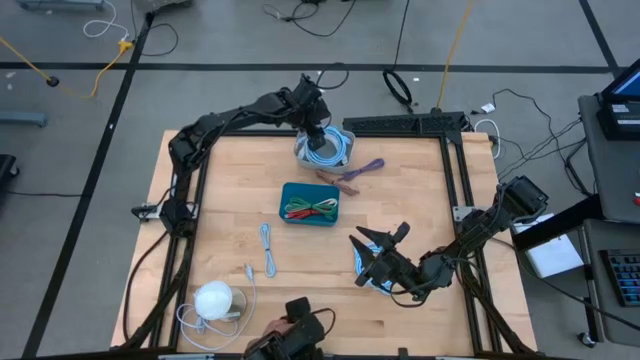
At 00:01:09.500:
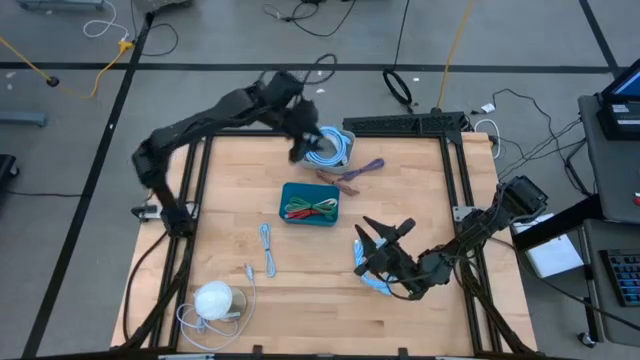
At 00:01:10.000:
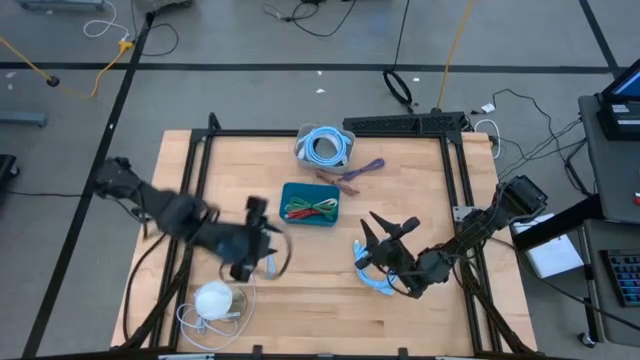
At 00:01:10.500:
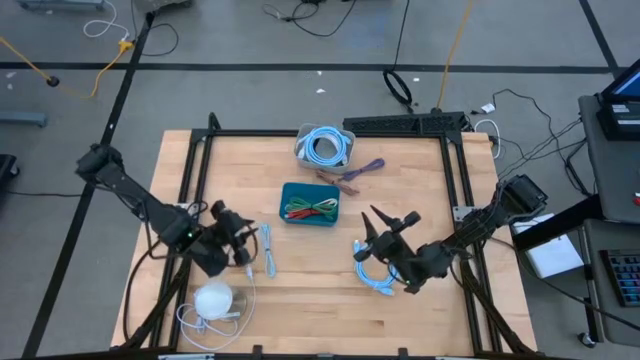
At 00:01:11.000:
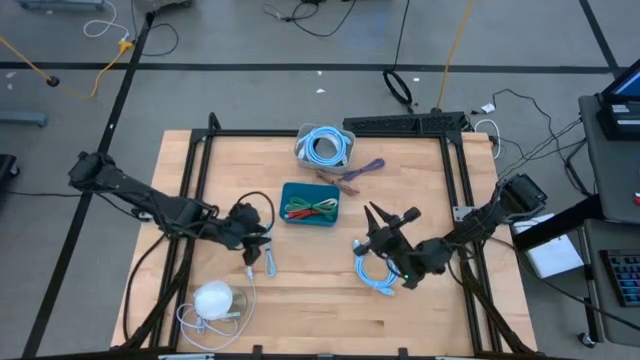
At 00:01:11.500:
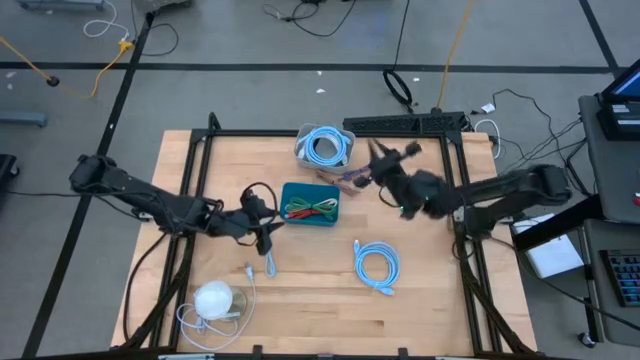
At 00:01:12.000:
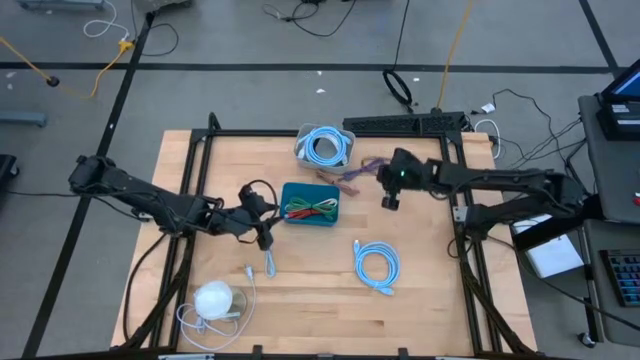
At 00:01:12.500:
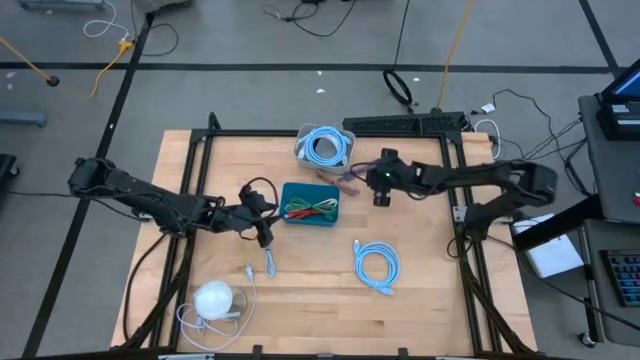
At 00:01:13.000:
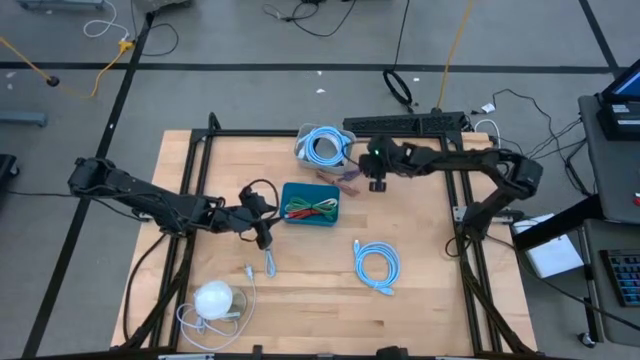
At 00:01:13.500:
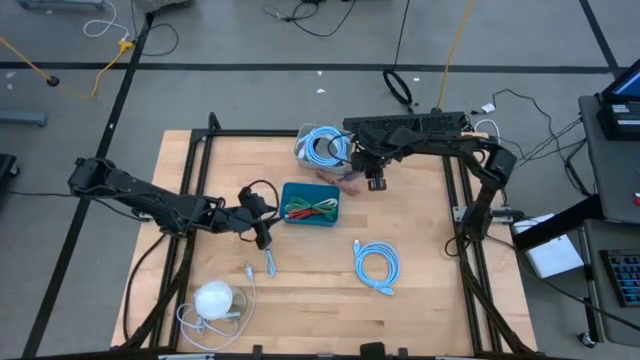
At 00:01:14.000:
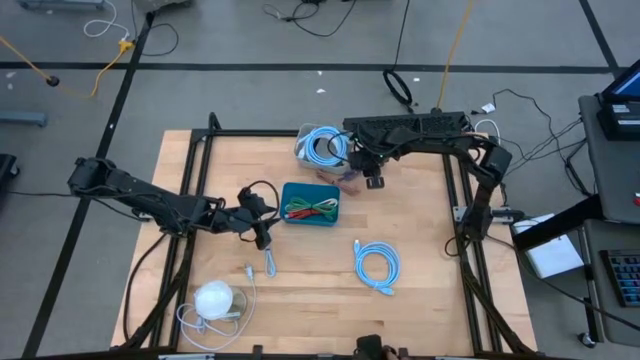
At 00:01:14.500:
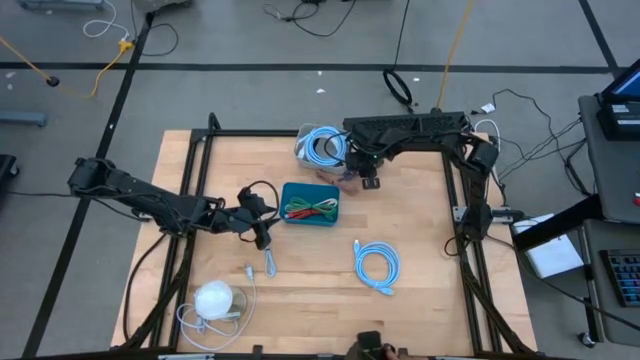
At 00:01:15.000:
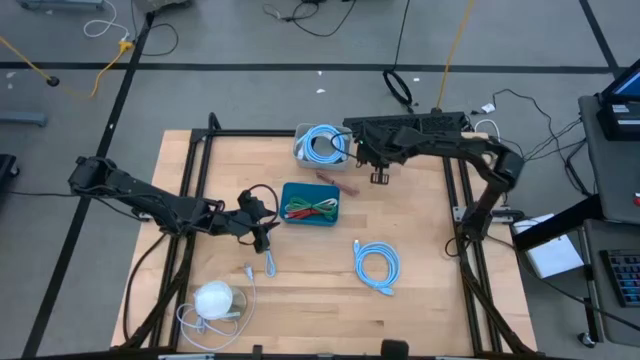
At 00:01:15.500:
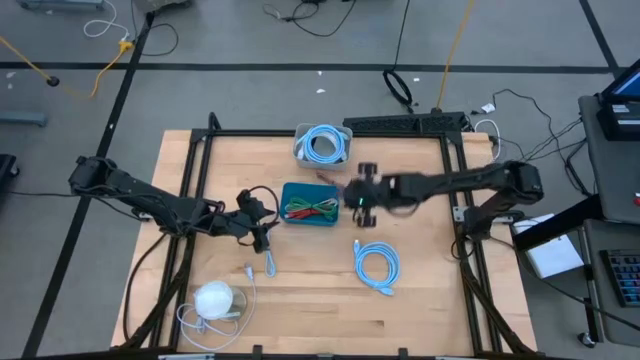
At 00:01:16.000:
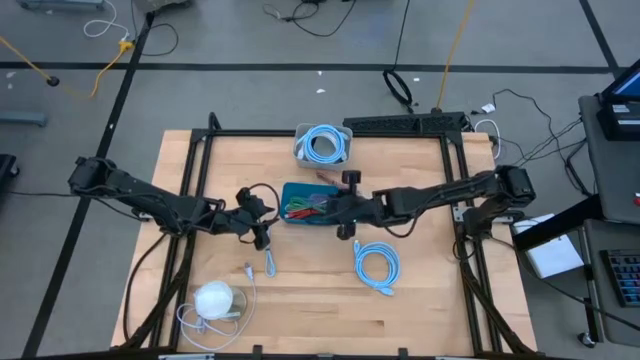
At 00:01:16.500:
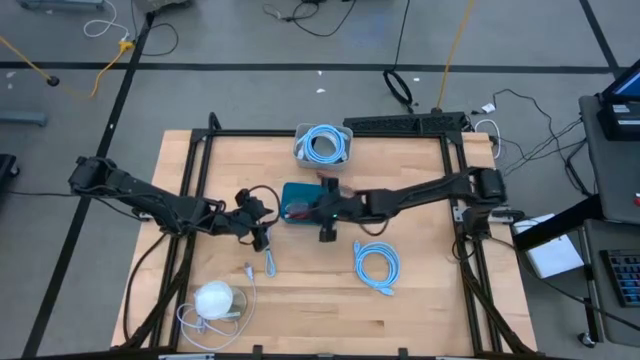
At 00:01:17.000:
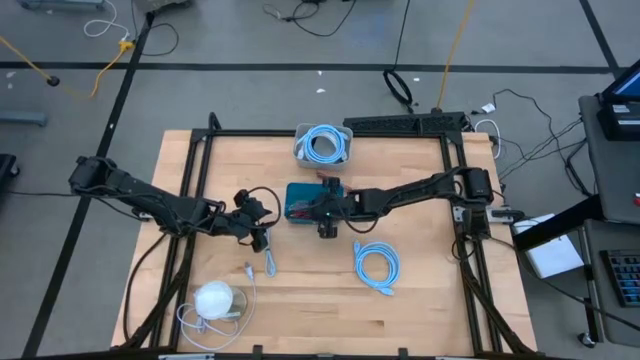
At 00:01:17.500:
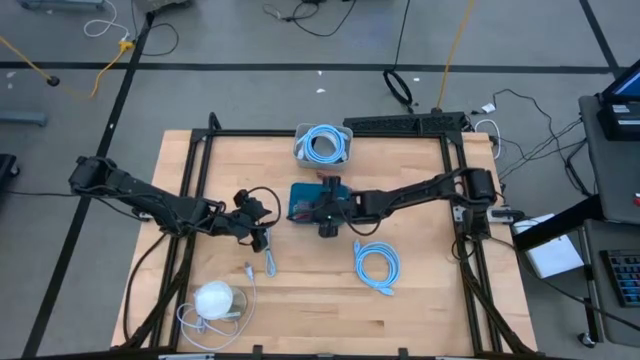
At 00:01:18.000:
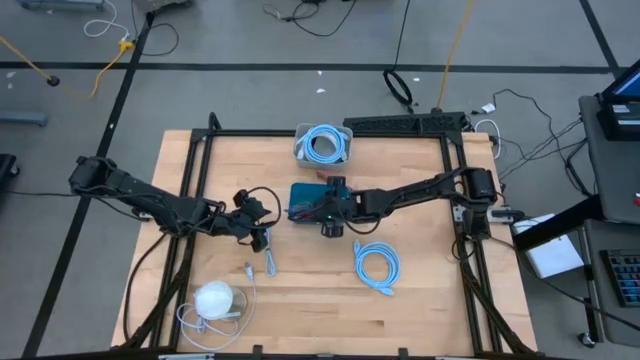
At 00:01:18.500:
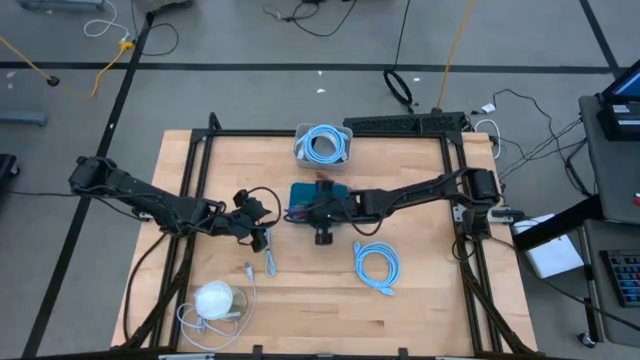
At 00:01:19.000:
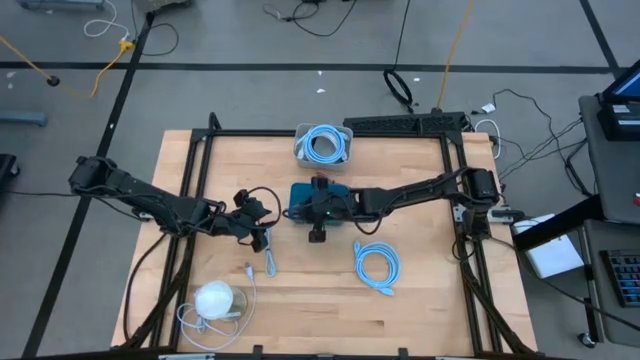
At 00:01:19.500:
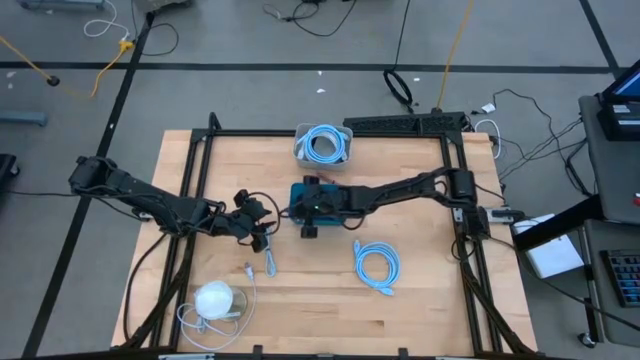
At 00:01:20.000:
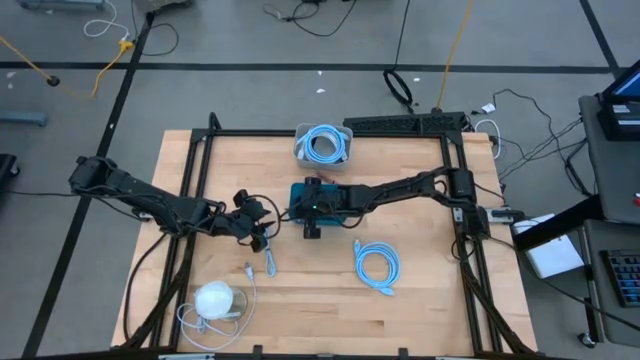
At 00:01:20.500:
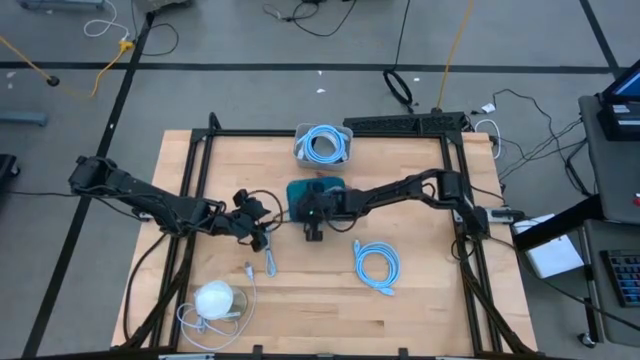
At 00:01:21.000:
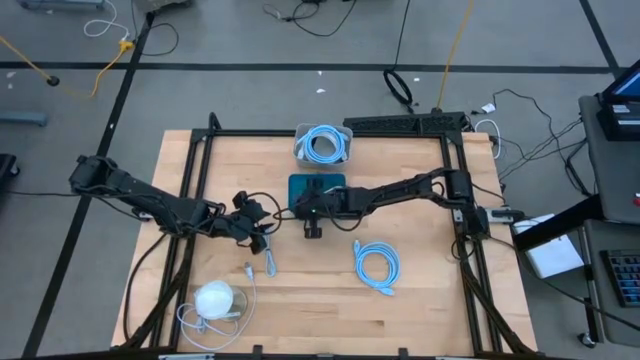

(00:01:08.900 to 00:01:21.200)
Task: Pick & Place USB Port
Put the purple charger cable into the blue bin

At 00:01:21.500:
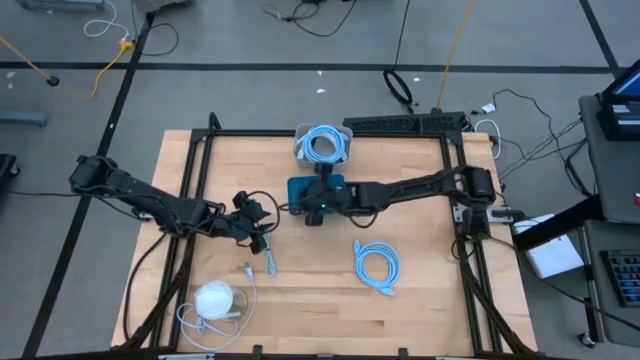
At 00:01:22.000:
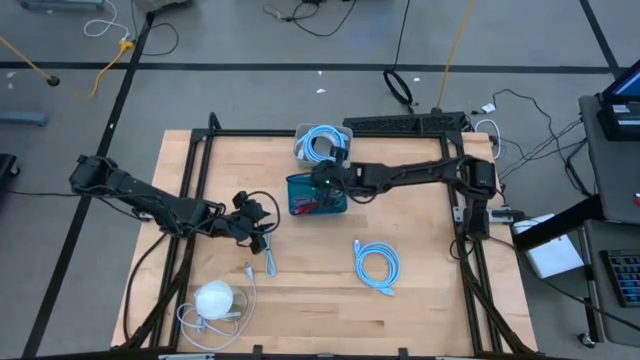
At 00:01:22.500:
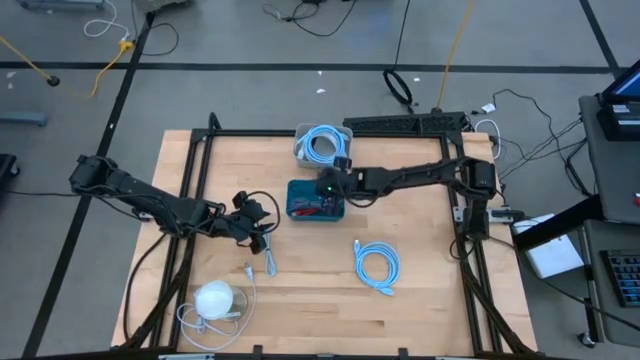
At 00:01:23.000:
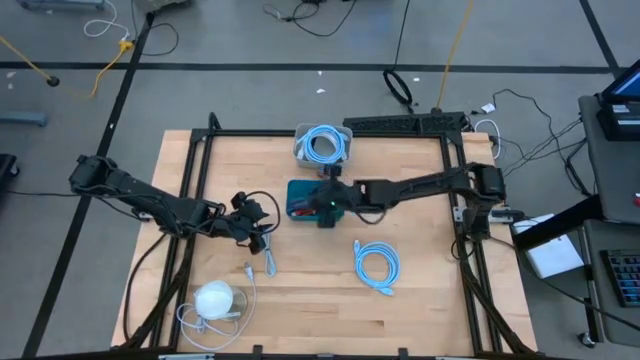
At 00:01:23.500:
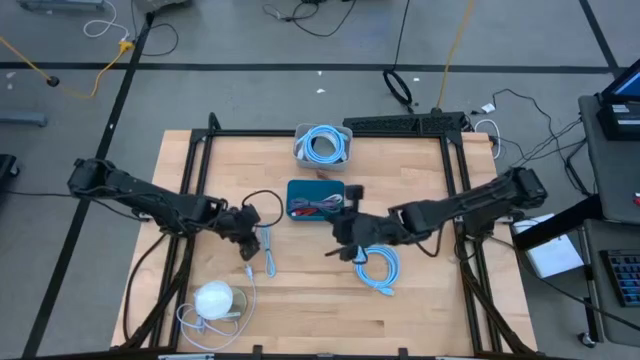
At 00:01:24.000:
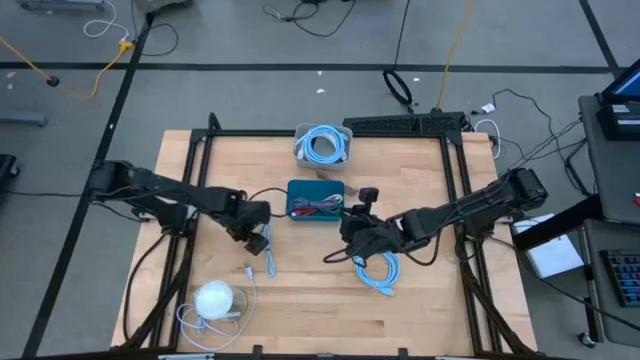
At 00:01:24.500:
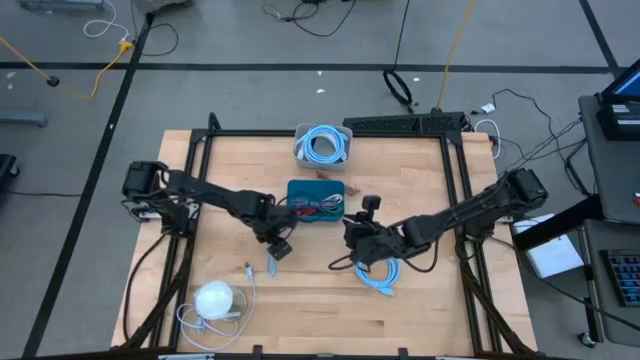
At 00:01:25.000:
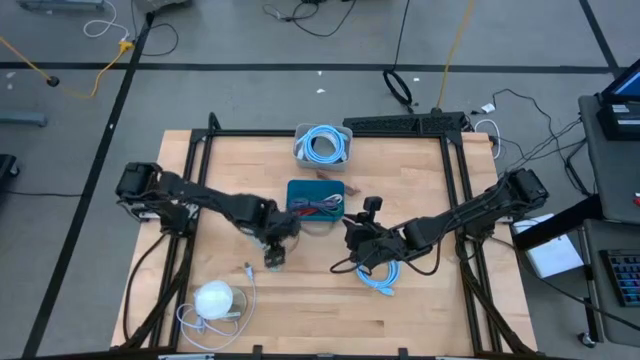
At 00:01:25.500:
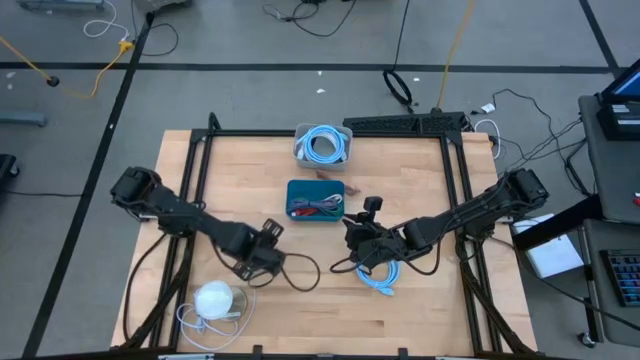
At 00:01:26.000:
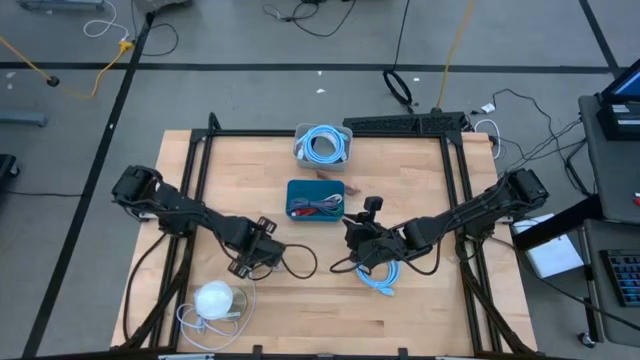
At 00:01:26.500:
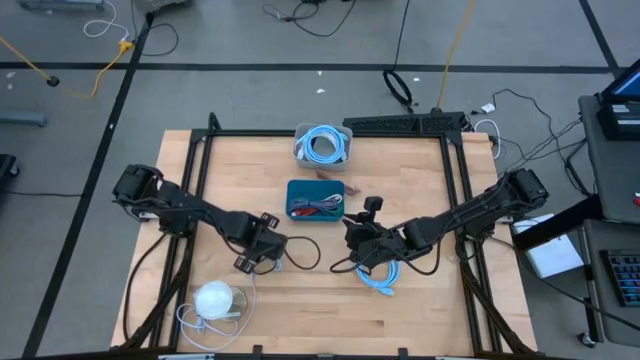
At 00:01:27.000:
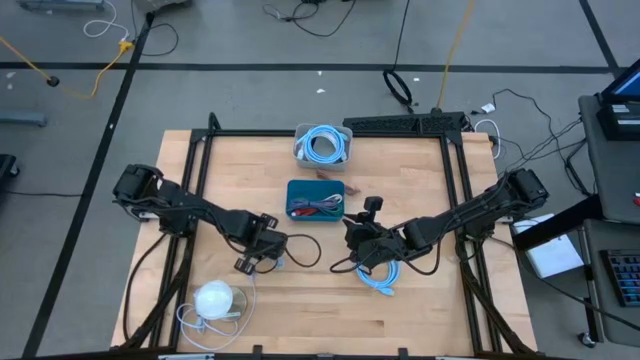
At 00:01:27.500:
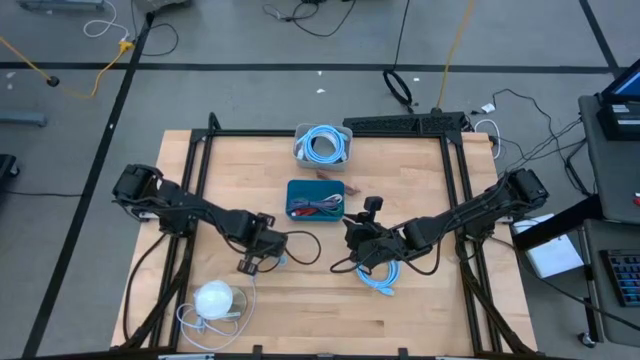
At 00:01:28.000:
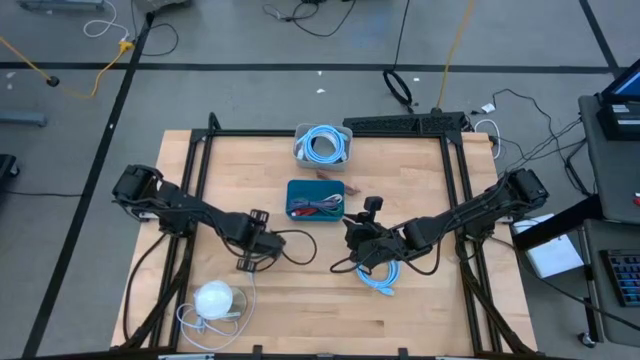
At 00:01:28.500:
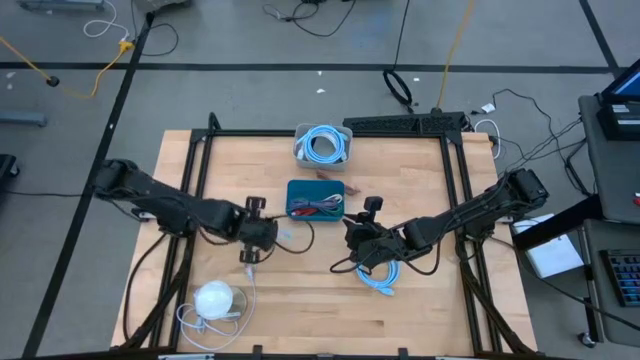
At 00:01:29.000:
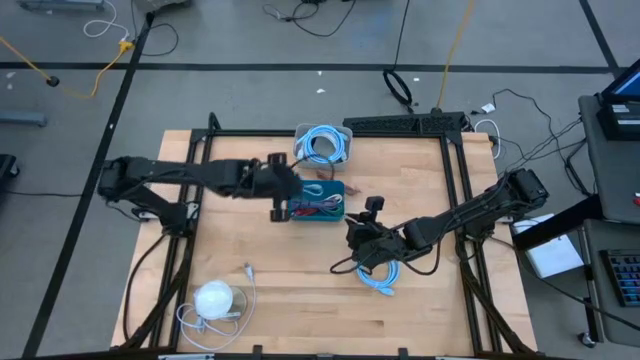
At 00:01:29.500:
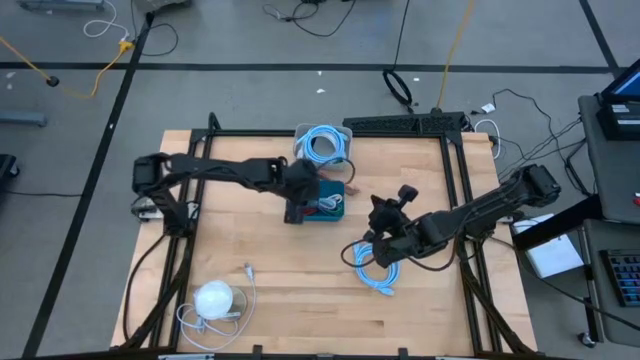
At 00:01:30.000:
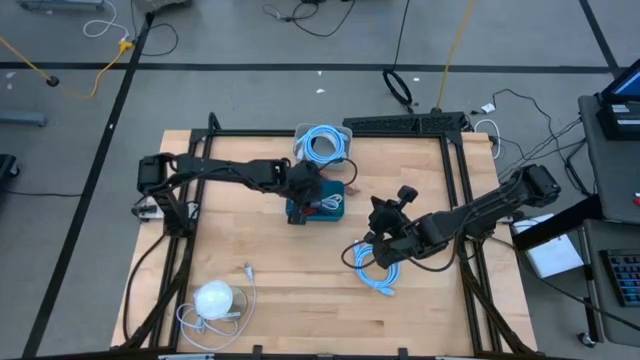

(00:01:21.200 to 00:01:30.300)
Put the blue charger cable into the blue bin
